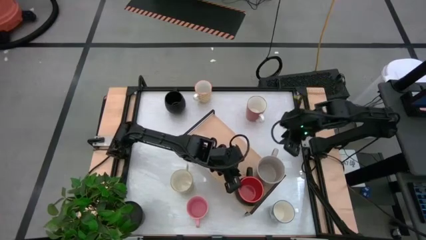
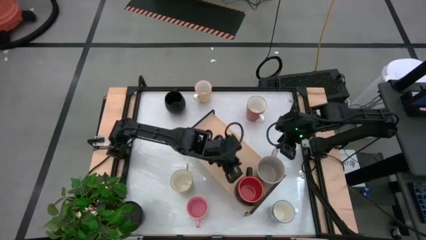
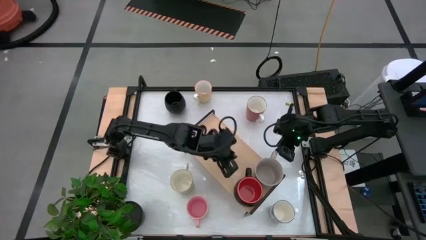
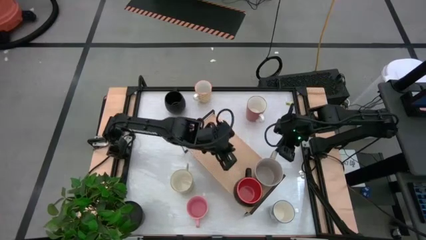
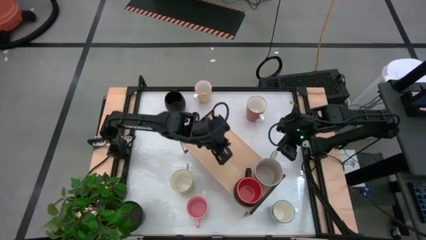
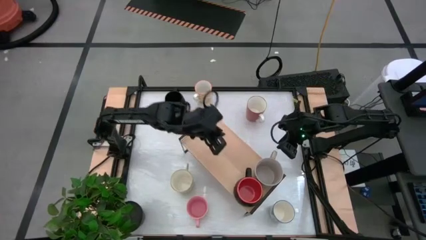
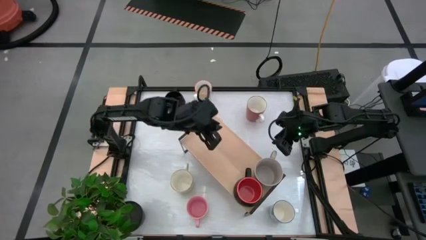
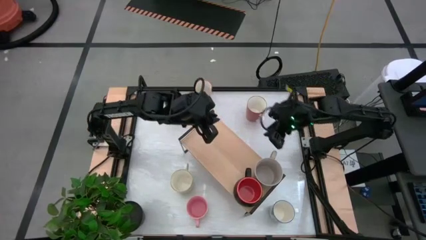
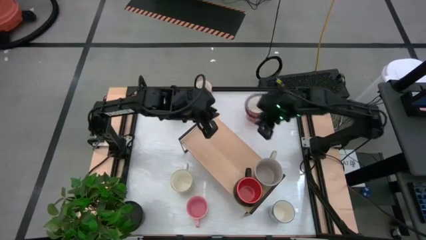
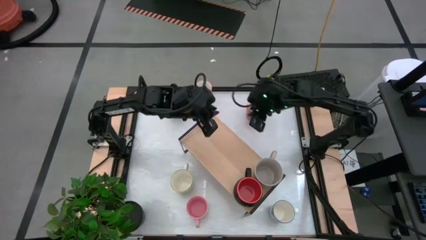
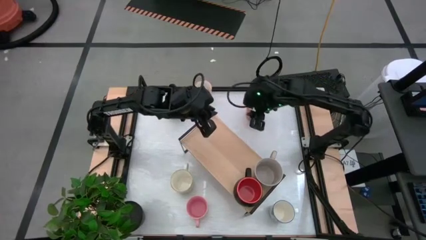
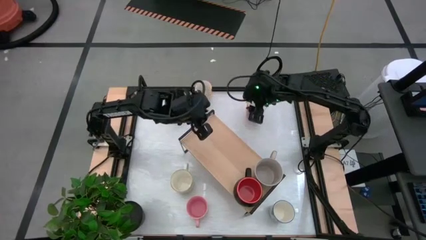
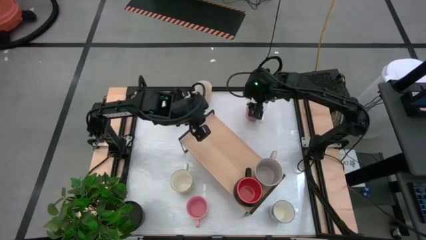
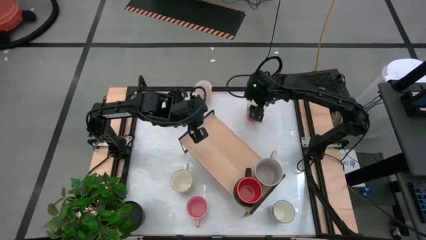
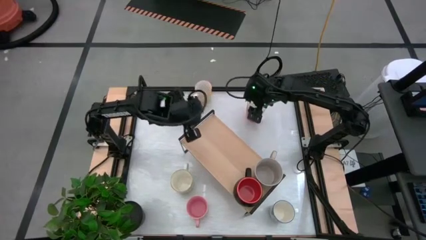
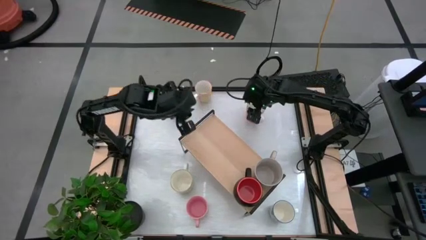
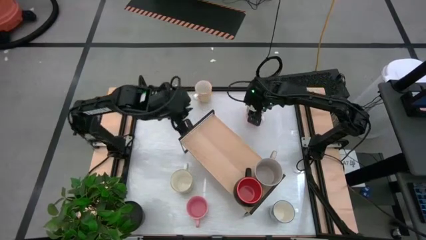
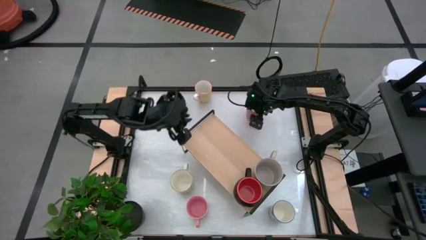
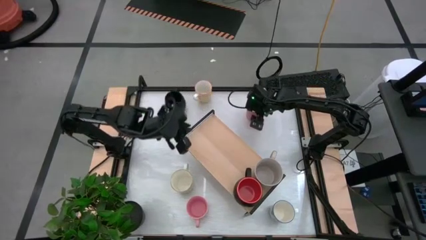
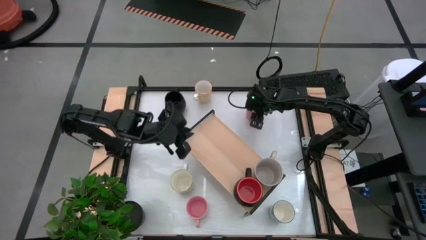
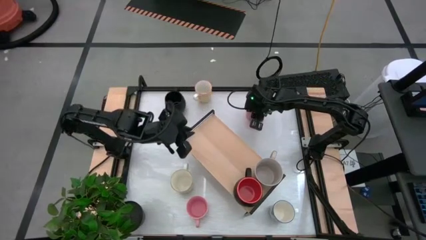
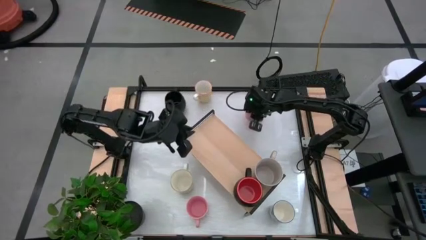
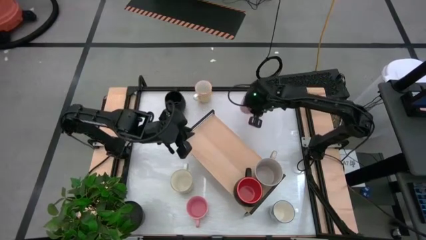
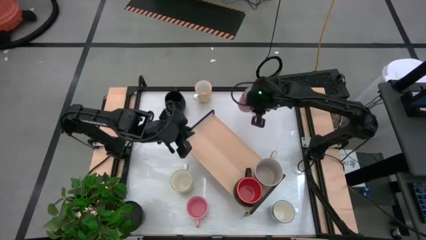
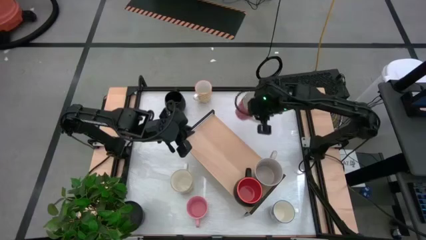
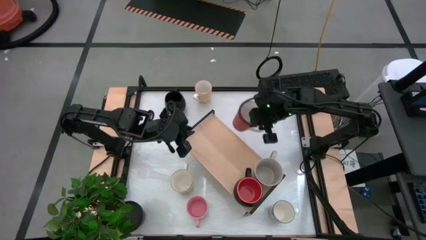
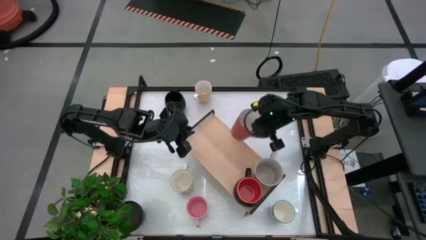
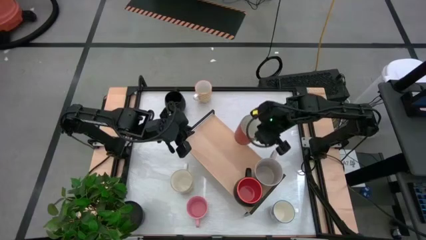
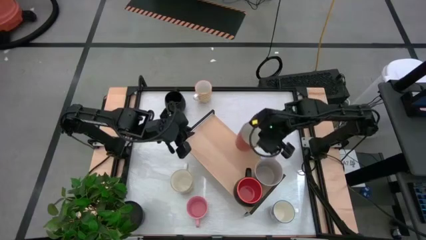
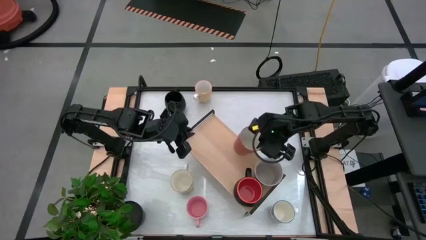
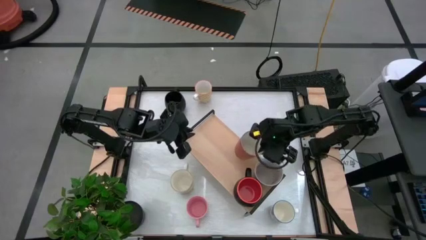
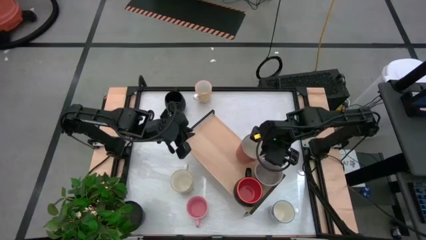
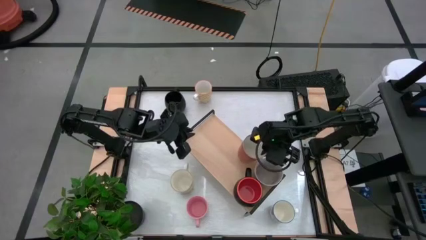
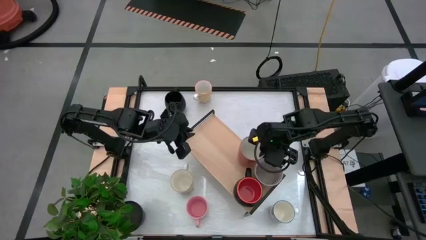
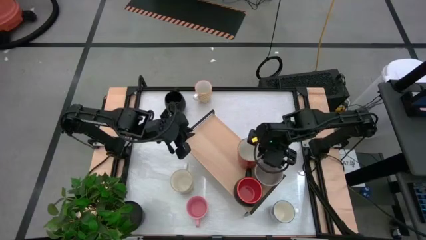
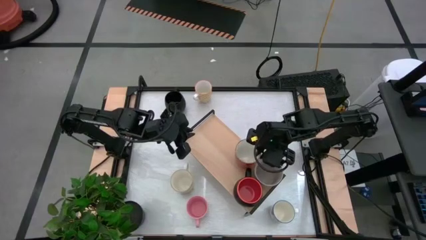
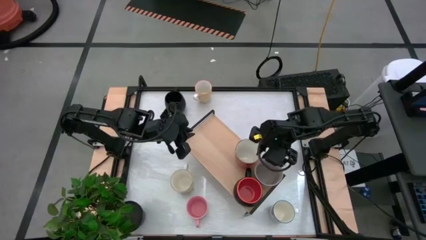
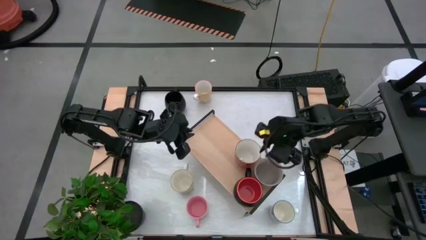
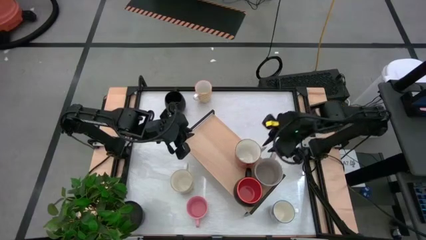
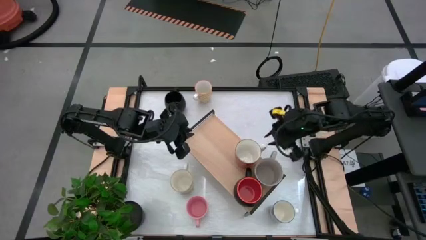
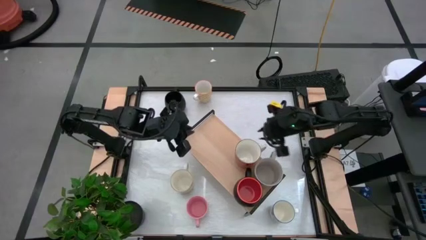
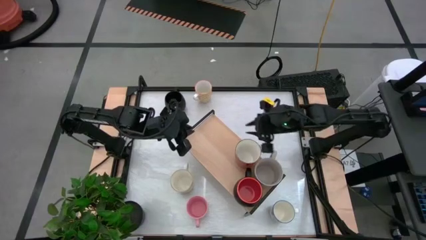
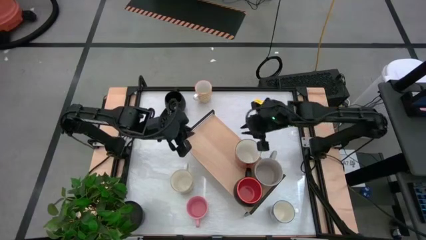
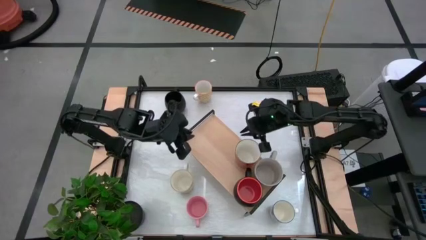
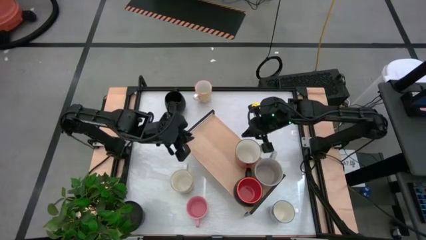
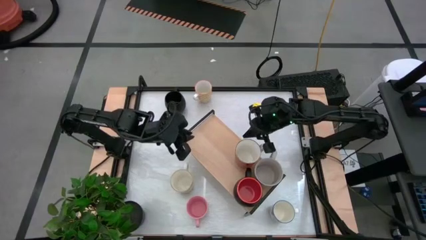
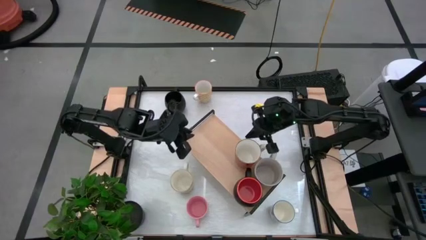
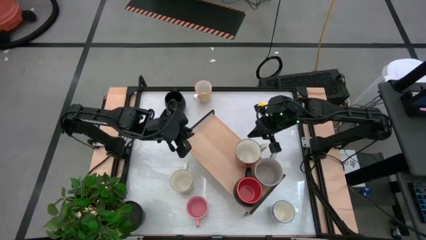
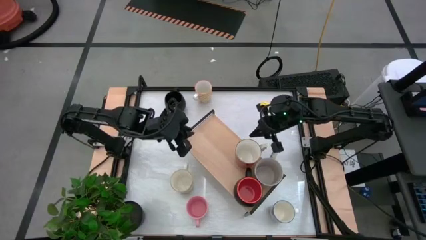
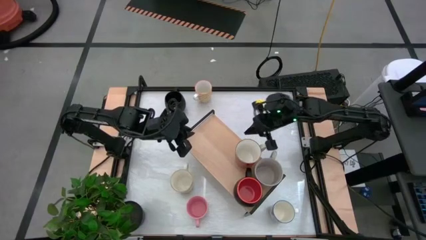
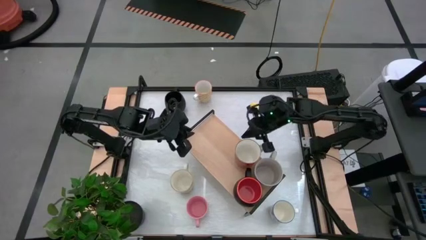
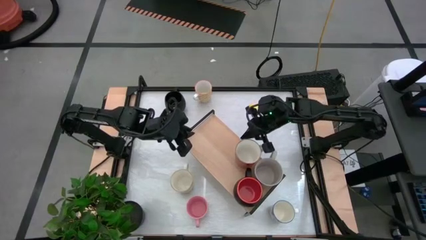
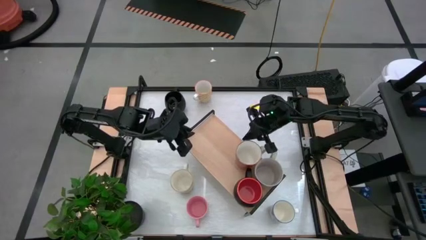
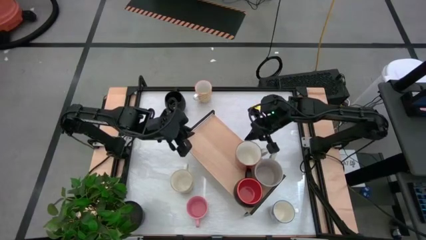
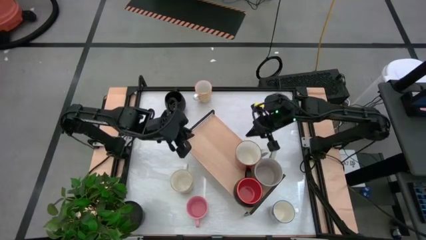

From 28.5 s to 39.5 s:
Task: Place coffee mugs
Put the orange mug on the shelf

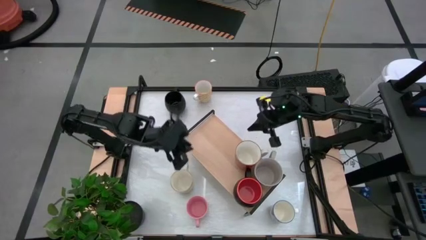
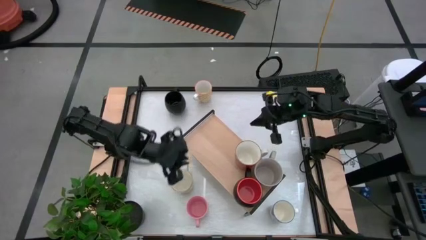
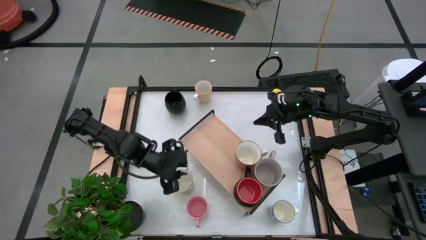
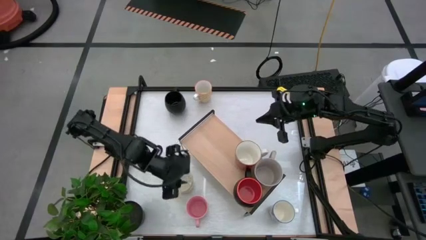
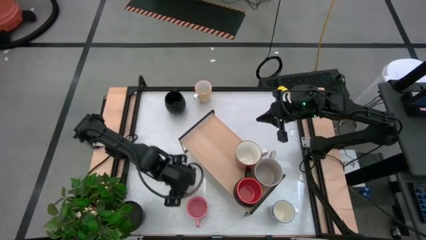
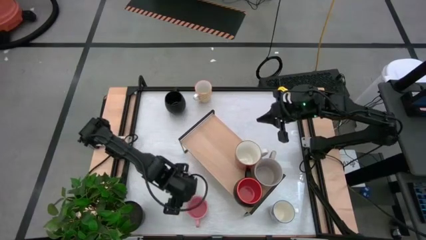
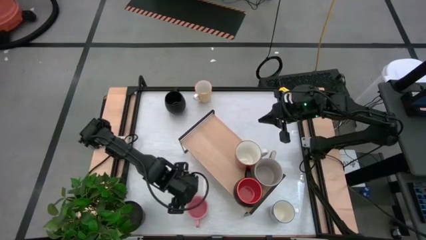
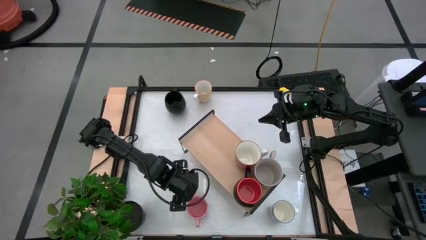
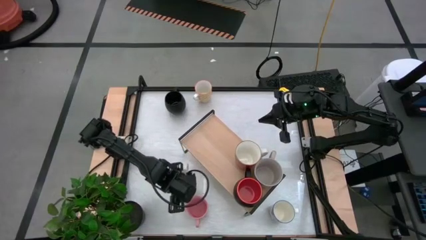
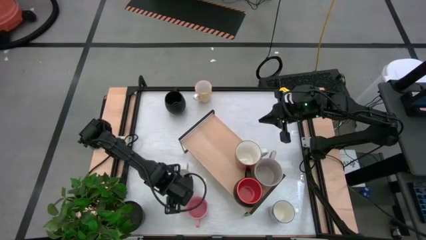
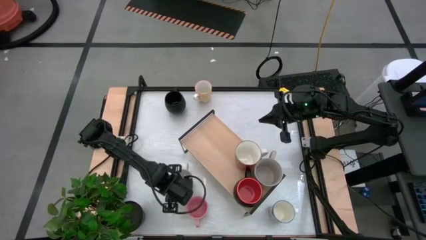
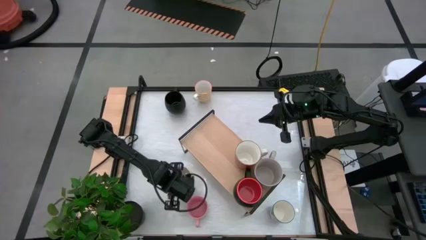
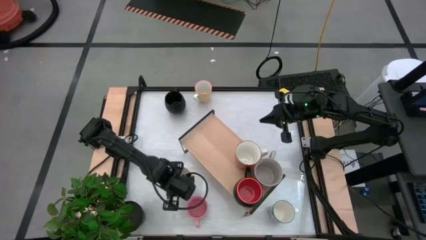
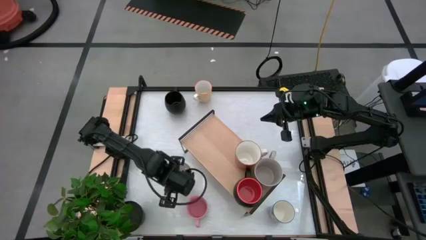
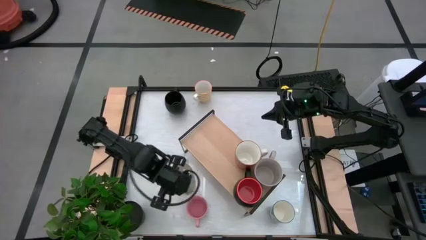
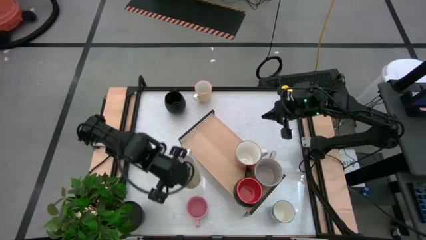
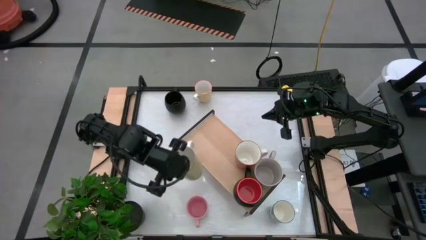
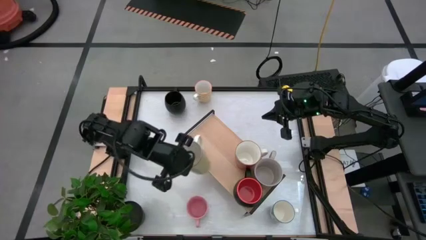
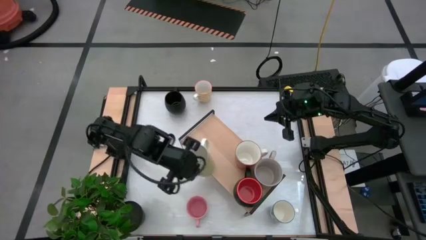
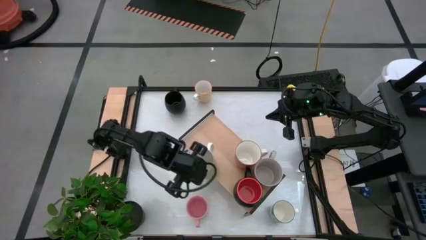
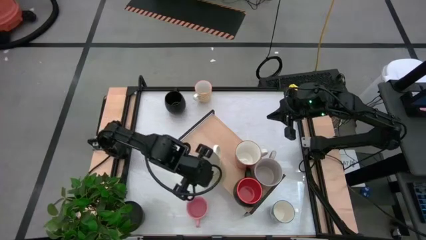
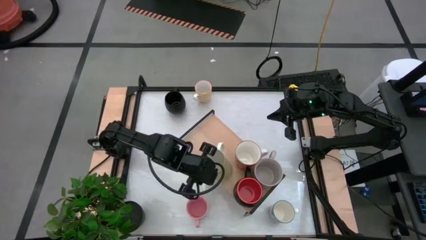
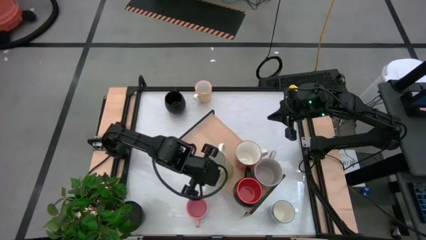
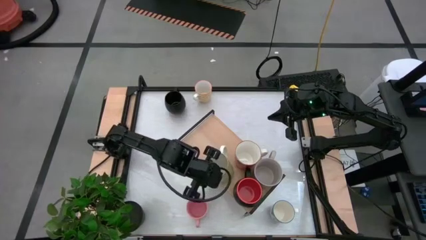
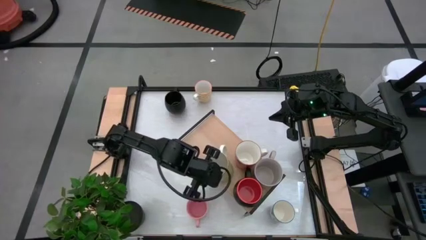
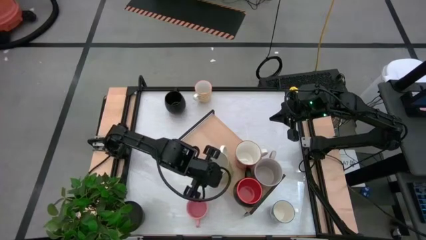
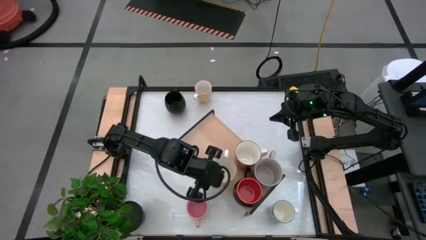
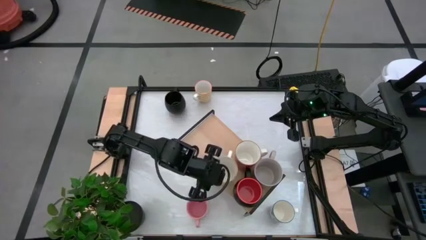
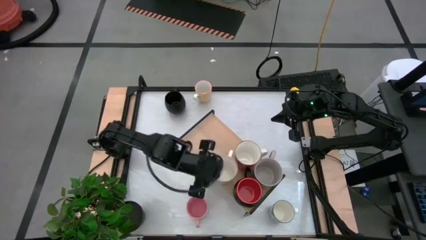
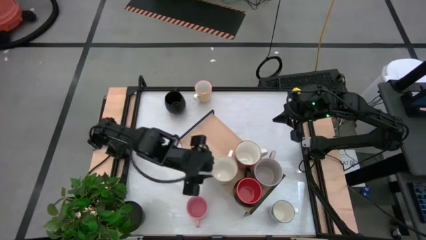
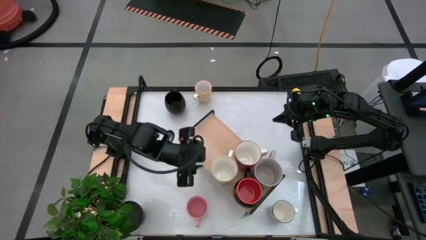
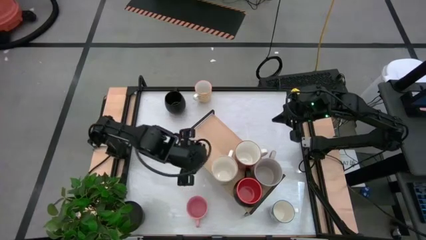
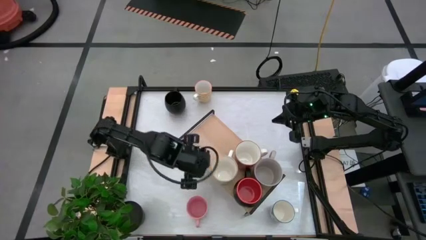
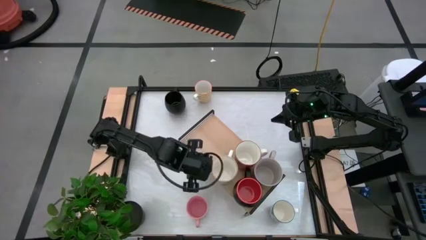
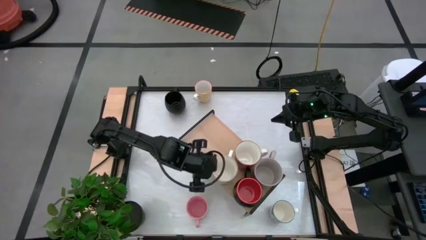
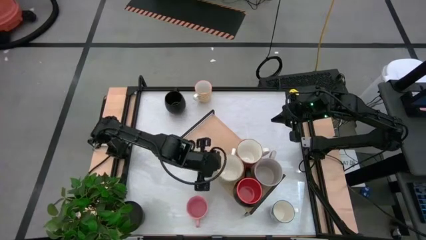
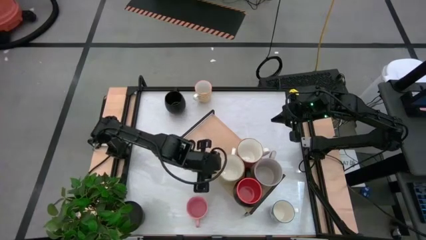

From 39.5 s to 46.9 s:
Put the green mug on the shelf
